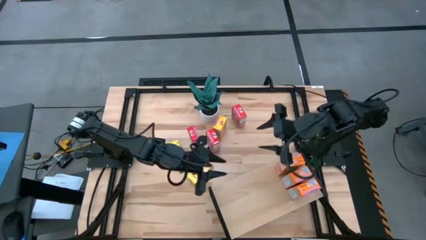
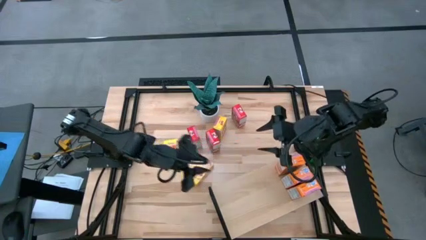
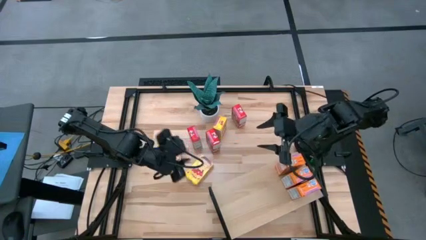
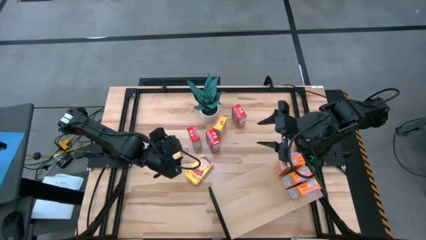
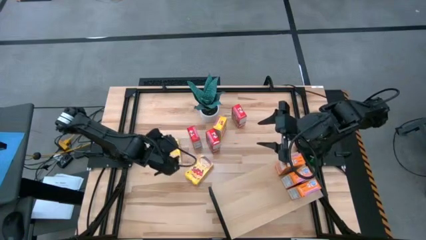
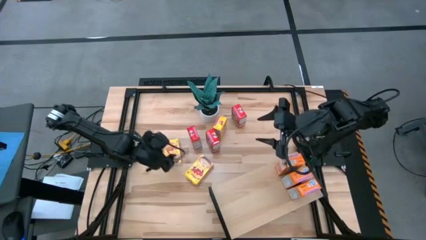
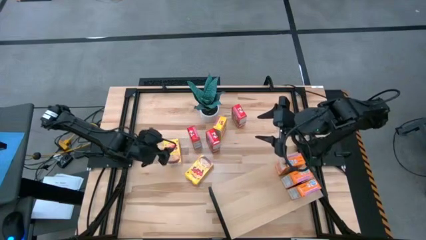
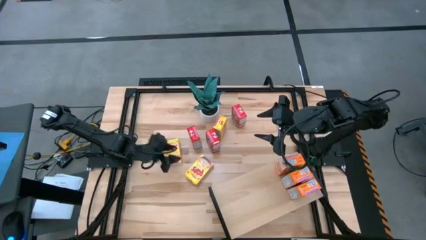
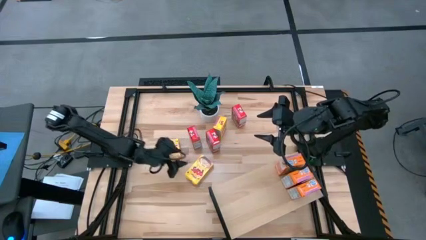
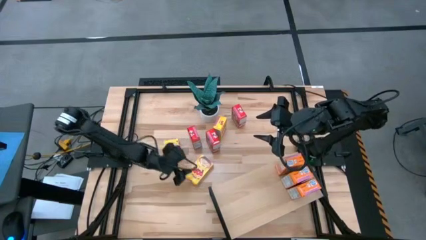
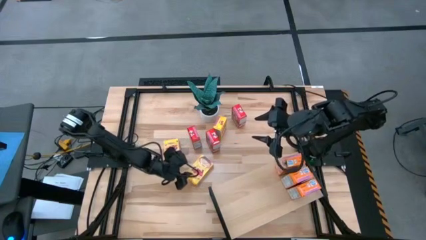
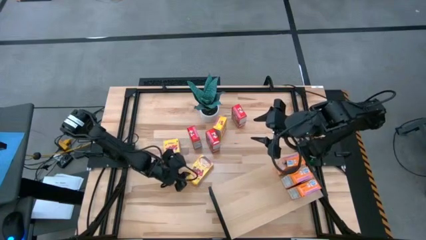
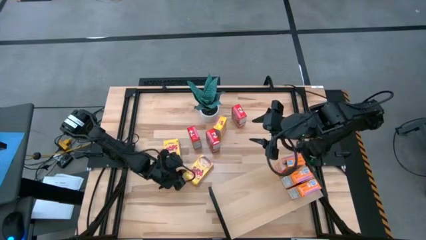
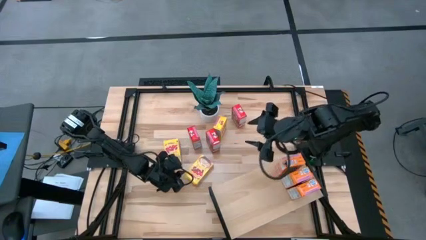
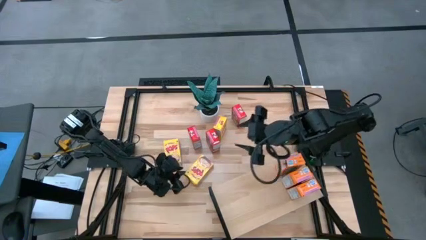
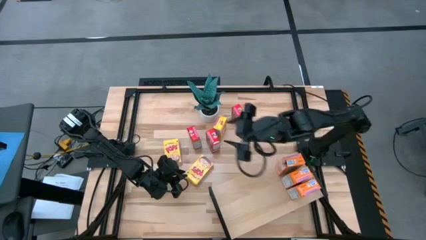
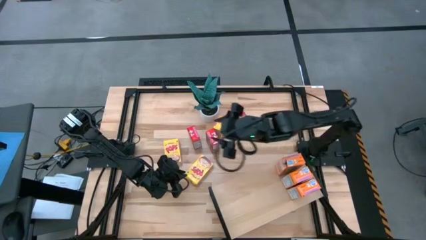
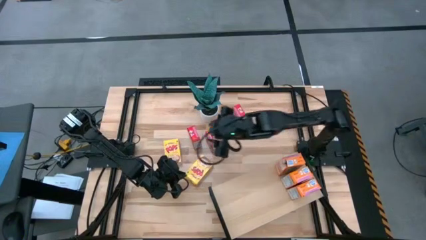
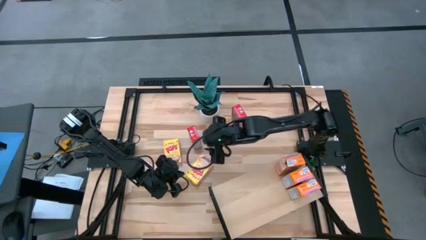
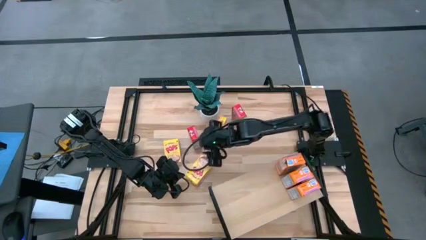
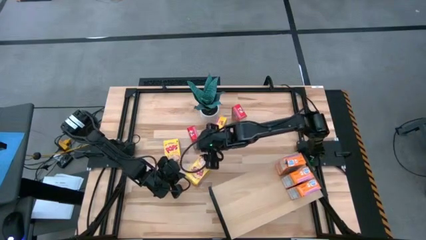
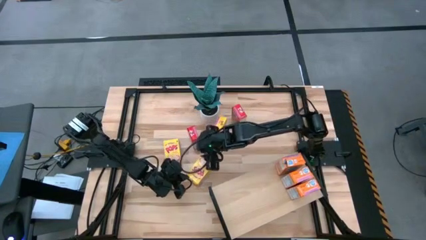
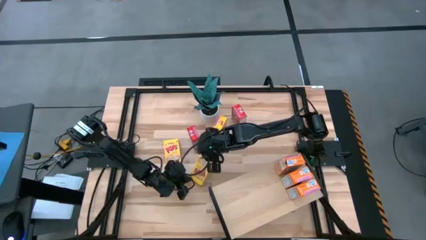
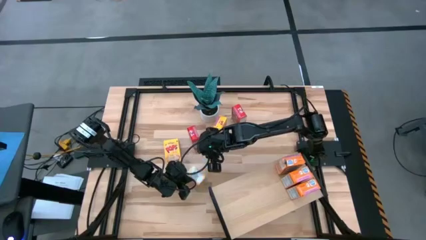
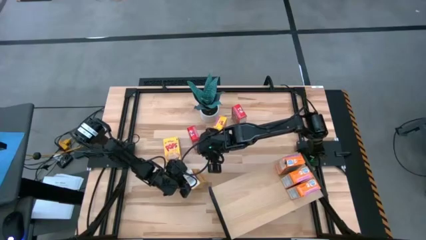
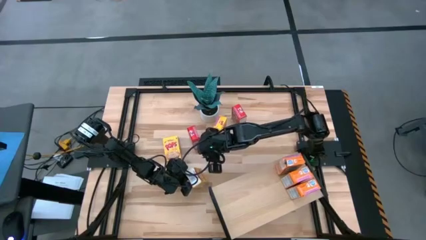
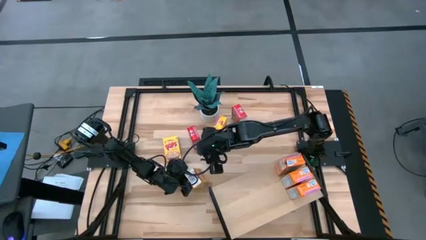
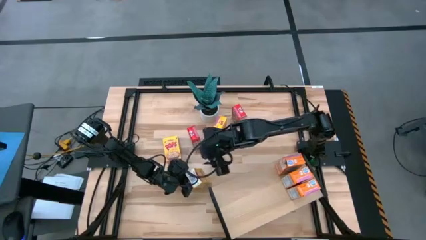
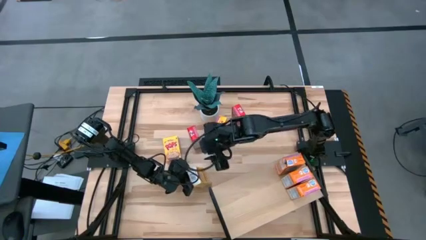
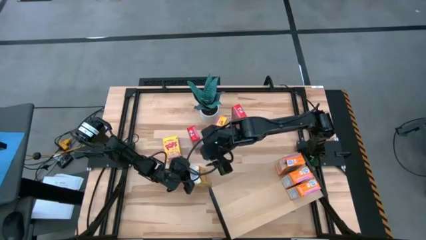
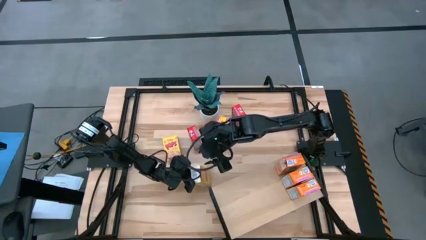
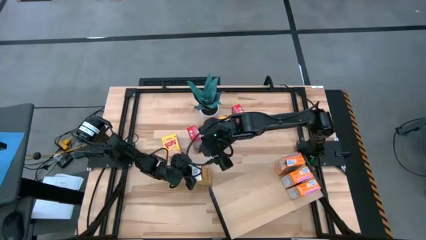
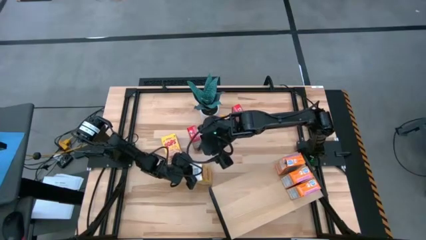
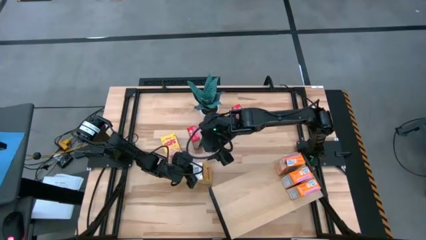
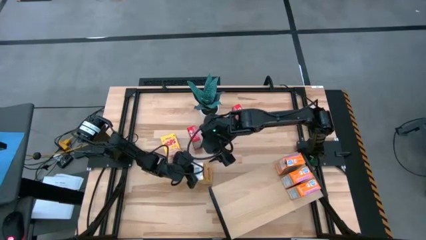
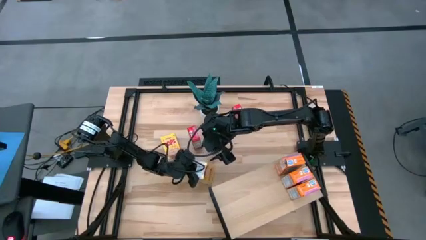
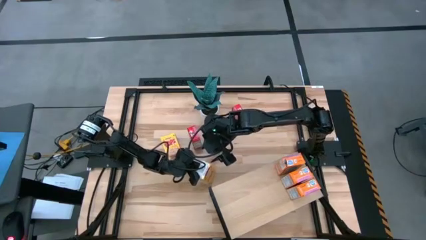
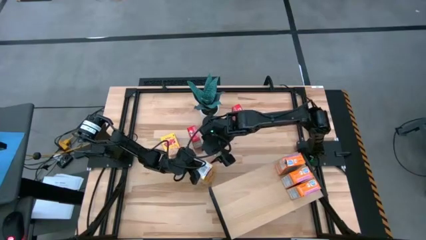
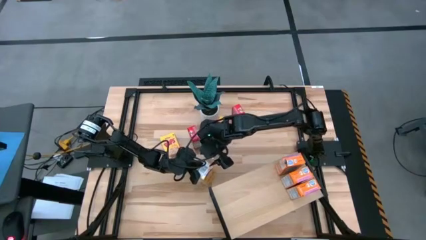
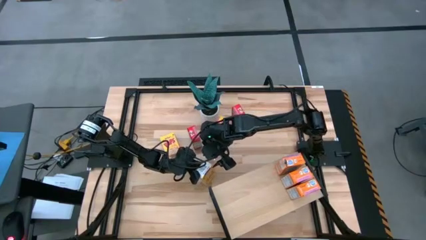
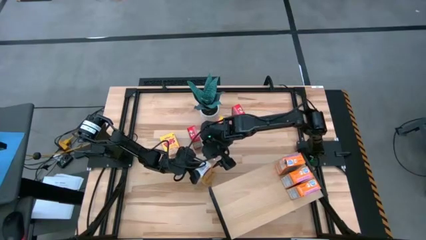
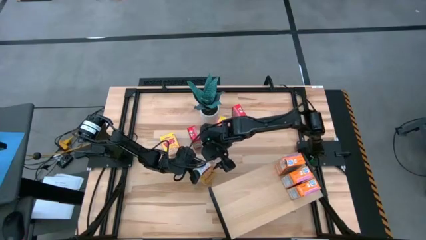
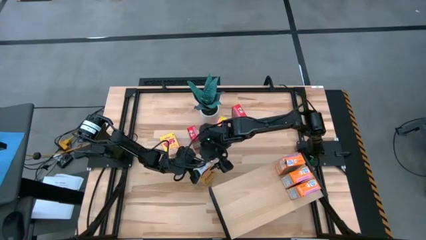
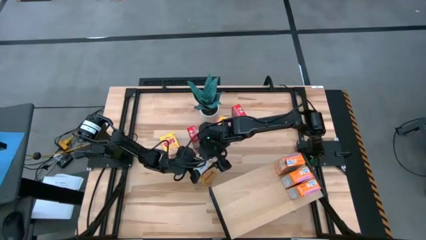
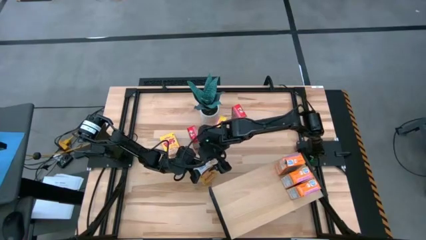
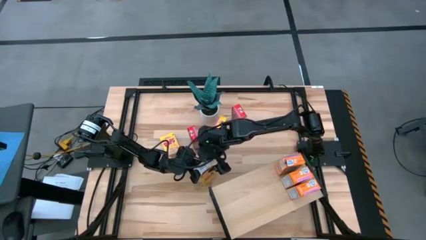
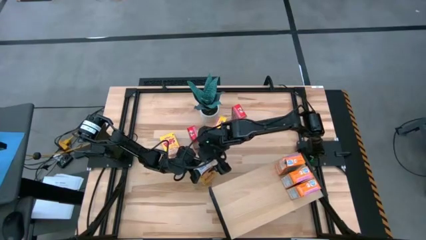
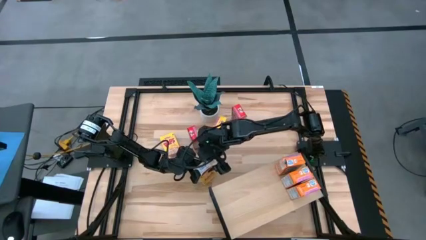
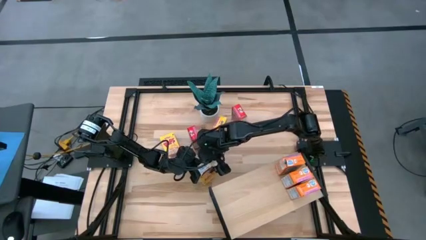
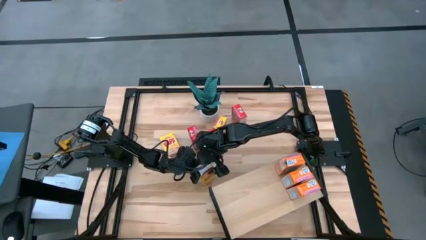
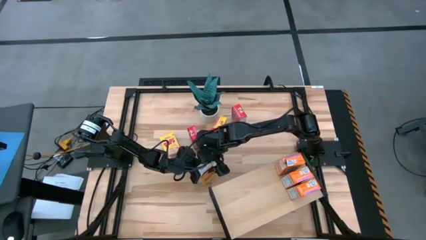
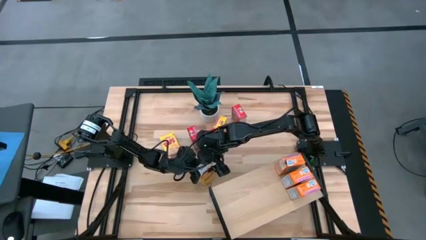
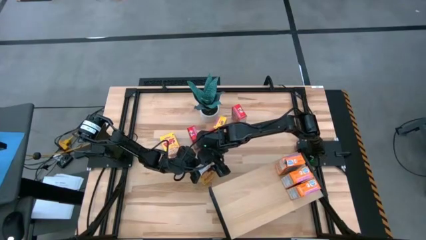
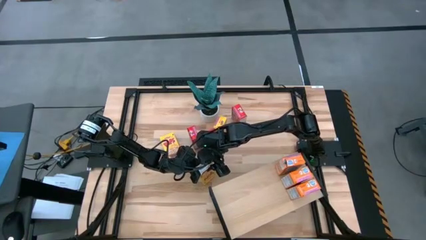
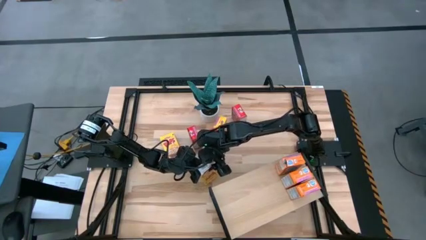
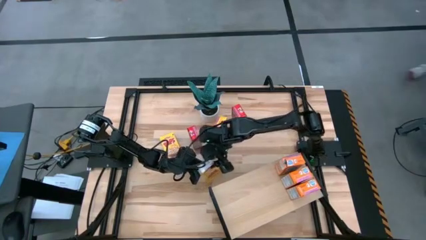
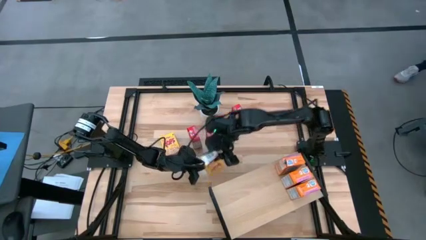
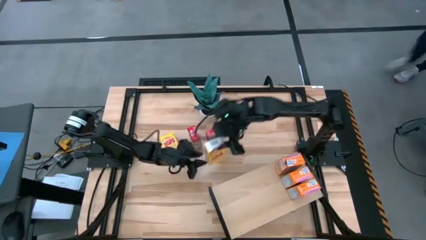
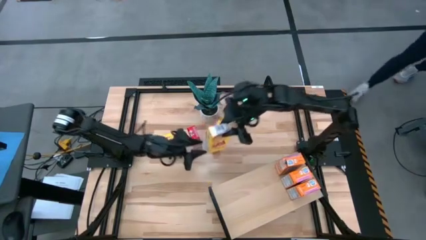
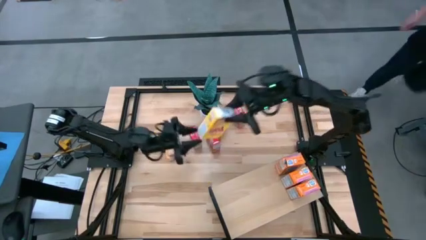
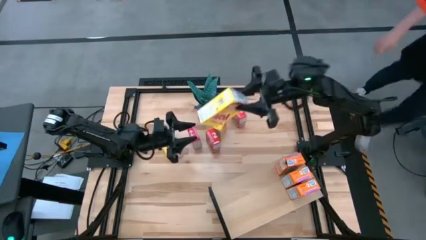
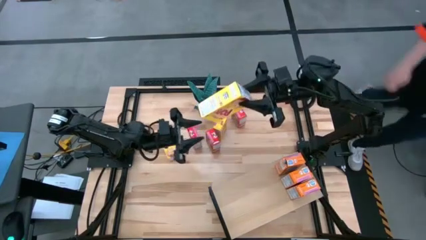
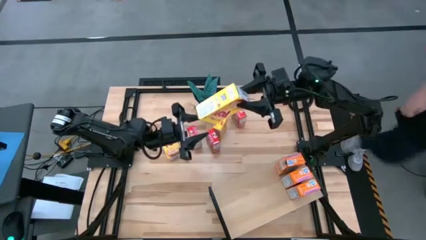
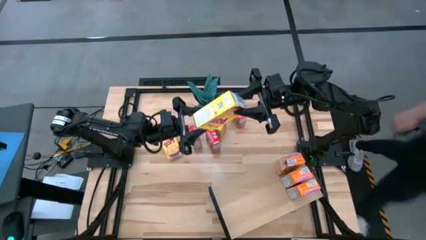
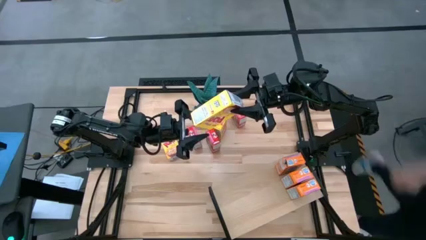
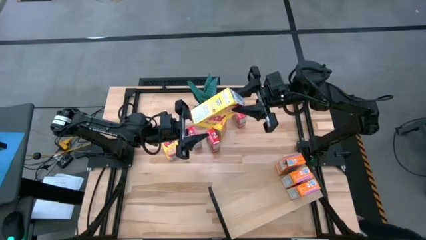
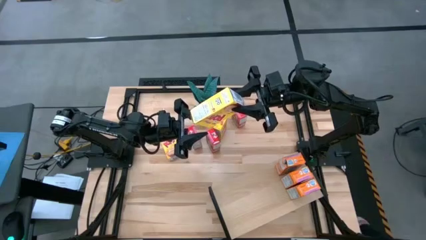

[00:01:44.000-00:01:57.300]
Task: Stack cereal on shelf
Put the bottom right yellow cereal box on the shelf
